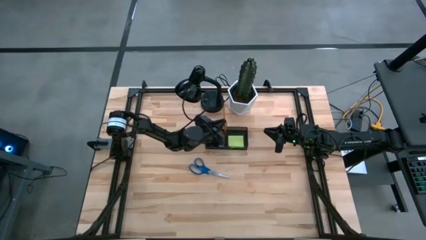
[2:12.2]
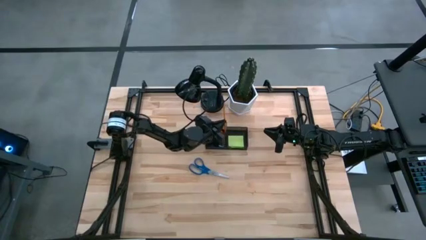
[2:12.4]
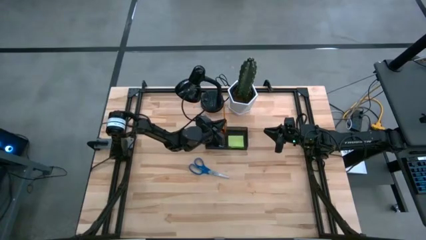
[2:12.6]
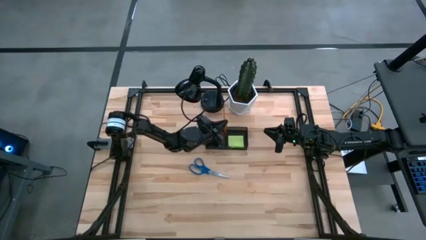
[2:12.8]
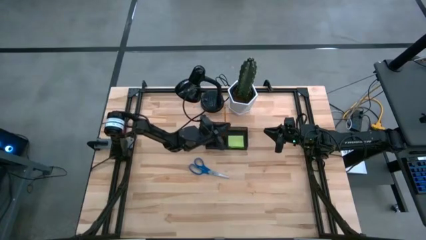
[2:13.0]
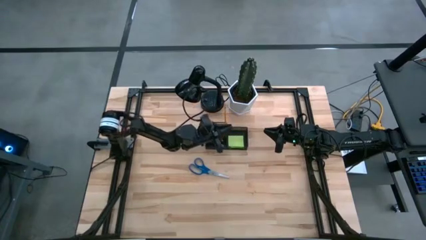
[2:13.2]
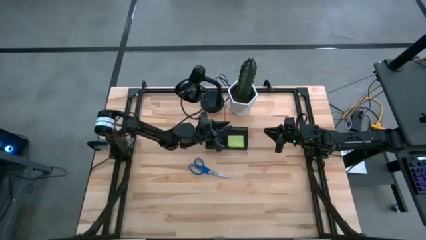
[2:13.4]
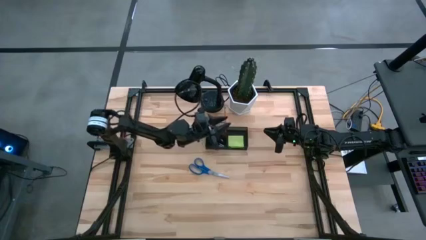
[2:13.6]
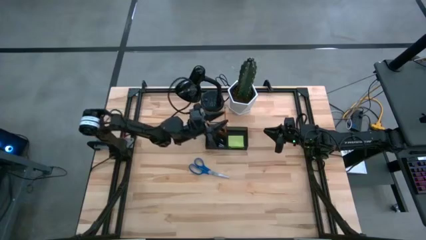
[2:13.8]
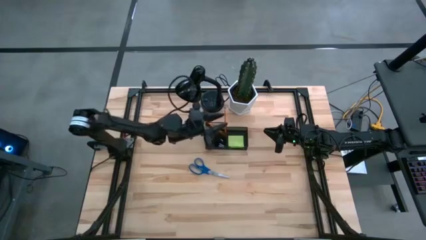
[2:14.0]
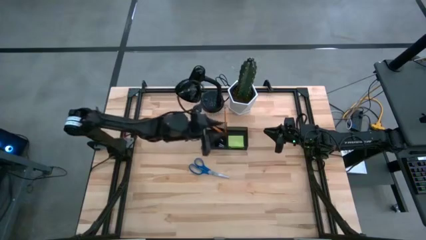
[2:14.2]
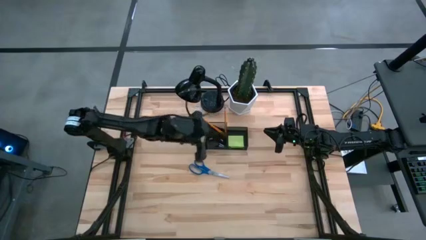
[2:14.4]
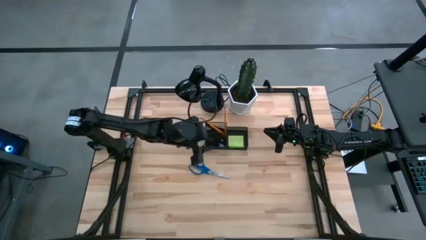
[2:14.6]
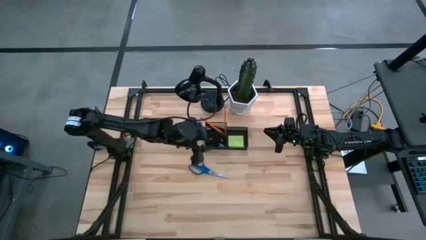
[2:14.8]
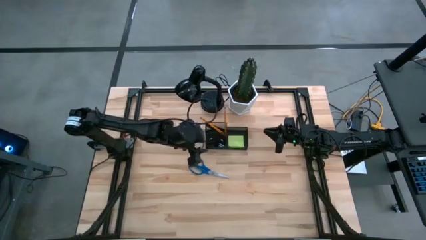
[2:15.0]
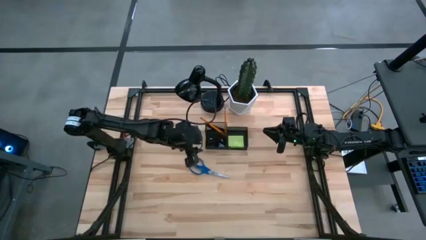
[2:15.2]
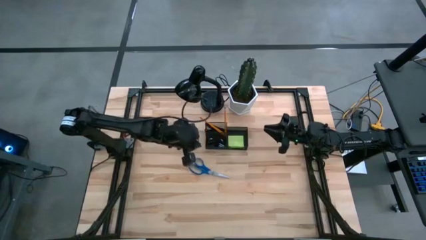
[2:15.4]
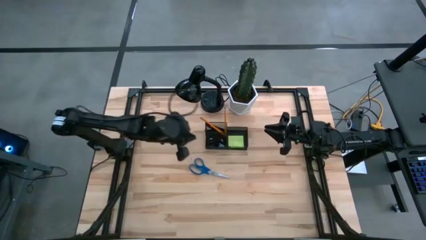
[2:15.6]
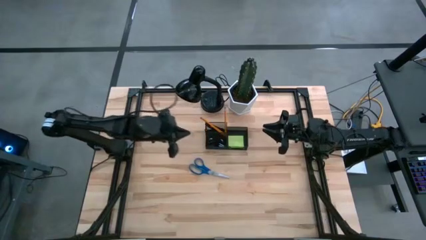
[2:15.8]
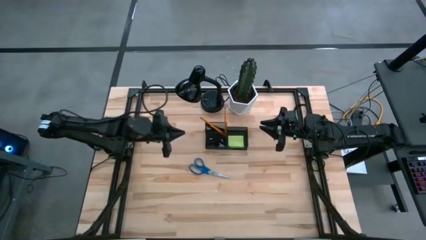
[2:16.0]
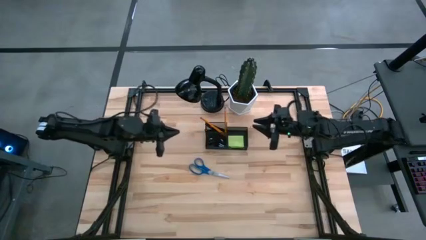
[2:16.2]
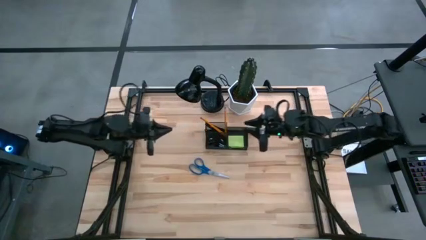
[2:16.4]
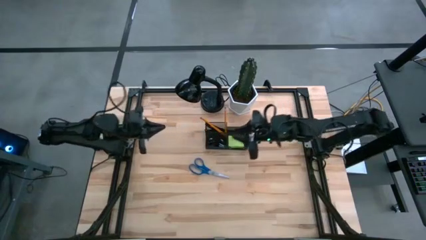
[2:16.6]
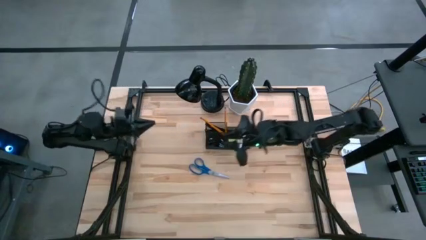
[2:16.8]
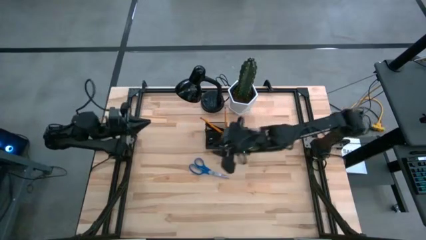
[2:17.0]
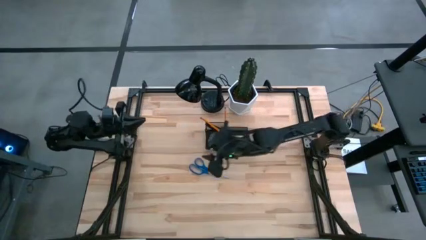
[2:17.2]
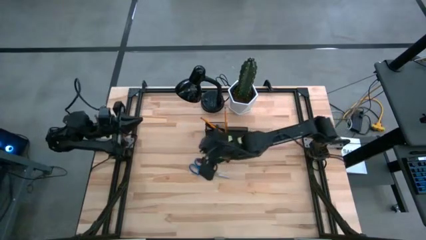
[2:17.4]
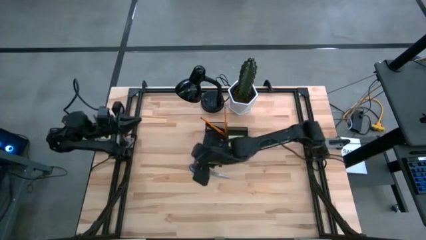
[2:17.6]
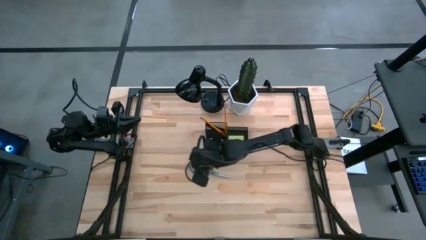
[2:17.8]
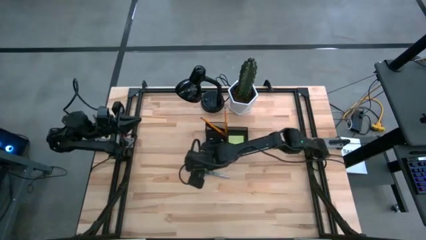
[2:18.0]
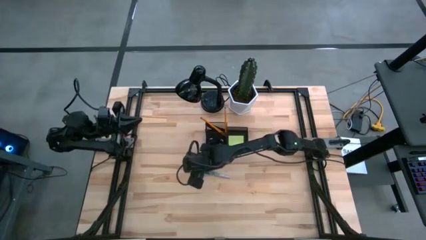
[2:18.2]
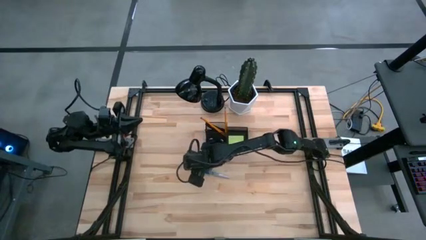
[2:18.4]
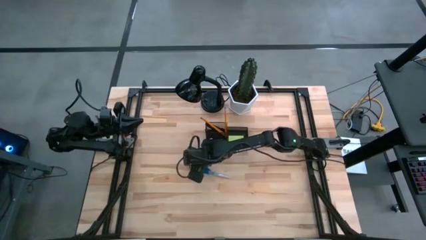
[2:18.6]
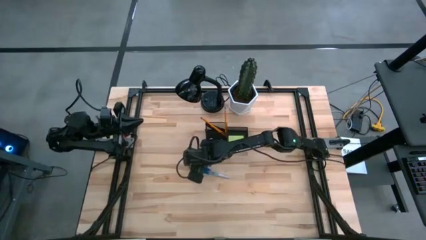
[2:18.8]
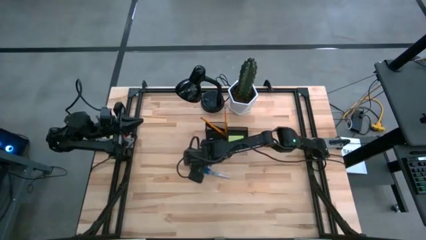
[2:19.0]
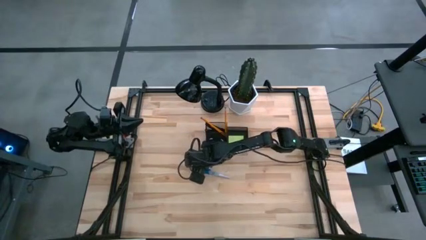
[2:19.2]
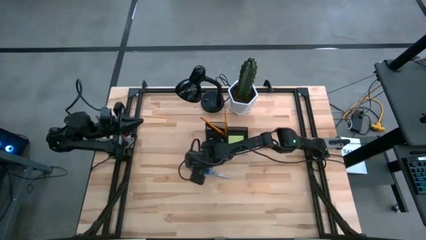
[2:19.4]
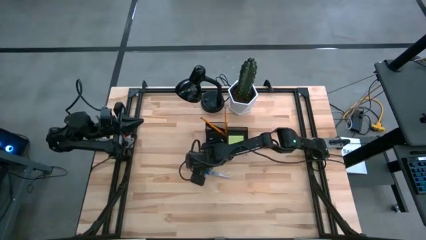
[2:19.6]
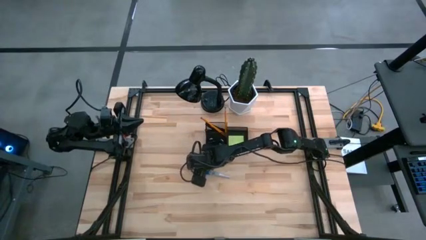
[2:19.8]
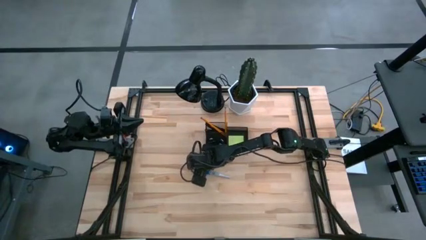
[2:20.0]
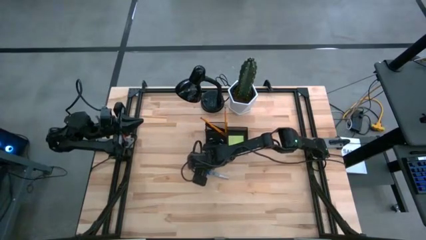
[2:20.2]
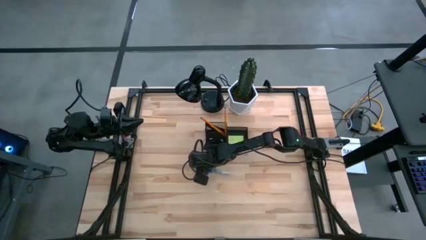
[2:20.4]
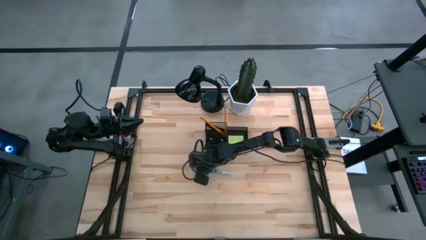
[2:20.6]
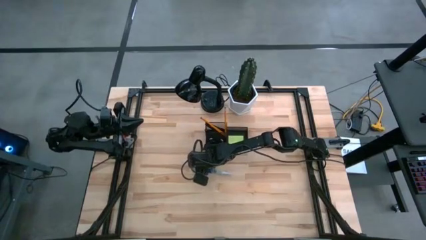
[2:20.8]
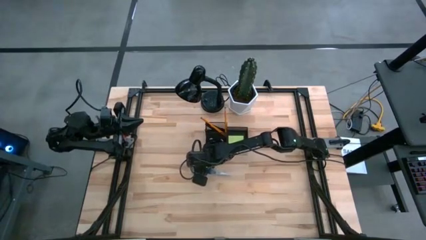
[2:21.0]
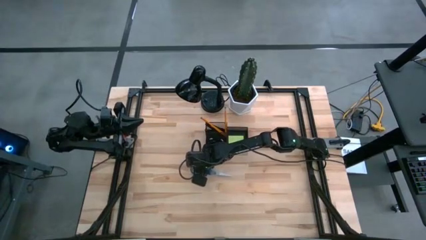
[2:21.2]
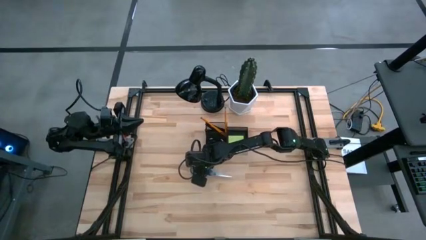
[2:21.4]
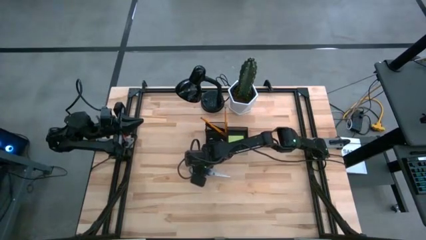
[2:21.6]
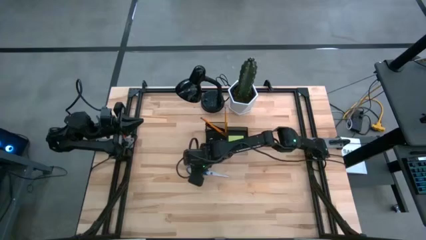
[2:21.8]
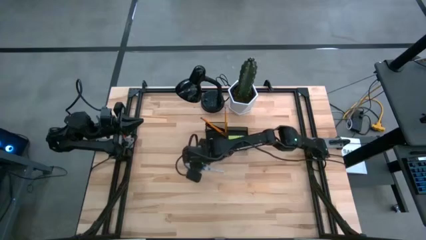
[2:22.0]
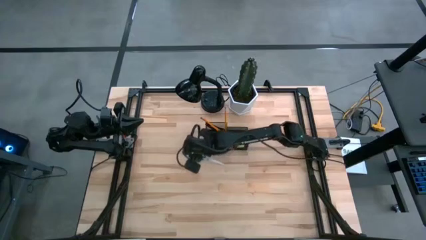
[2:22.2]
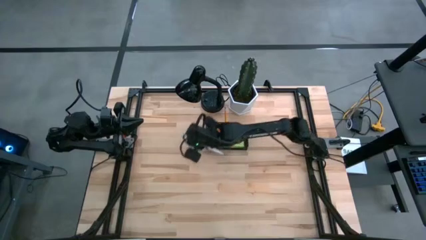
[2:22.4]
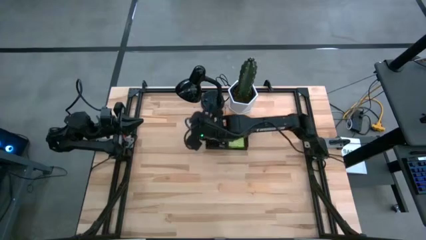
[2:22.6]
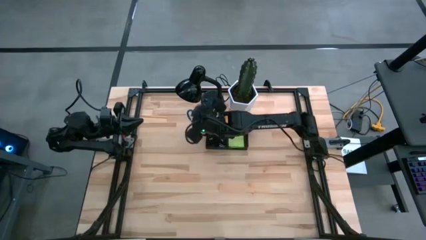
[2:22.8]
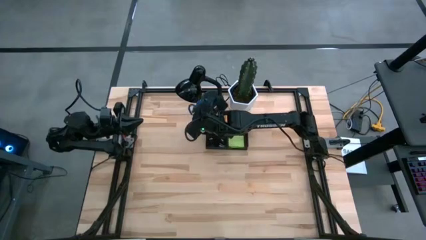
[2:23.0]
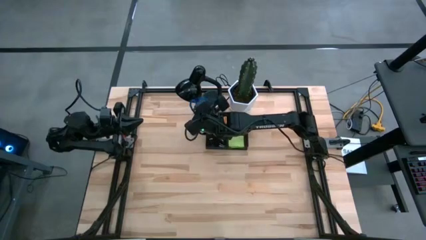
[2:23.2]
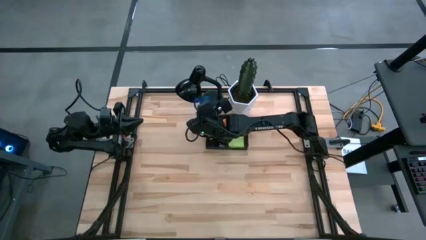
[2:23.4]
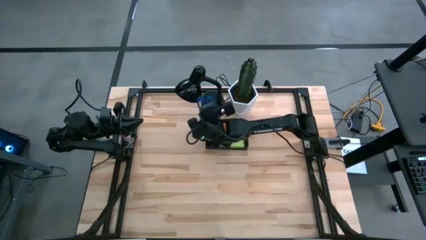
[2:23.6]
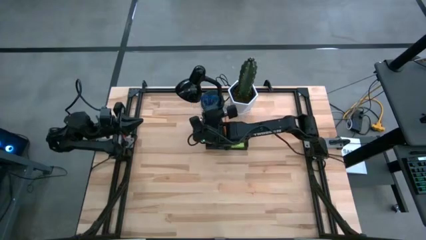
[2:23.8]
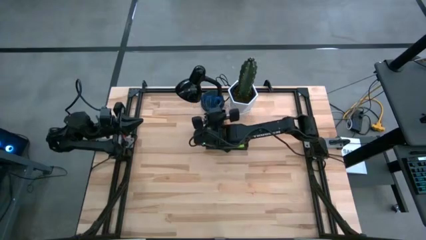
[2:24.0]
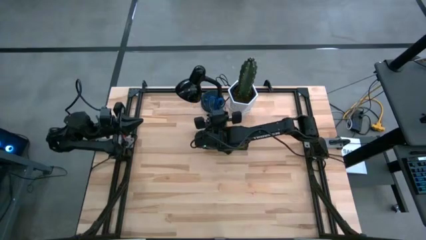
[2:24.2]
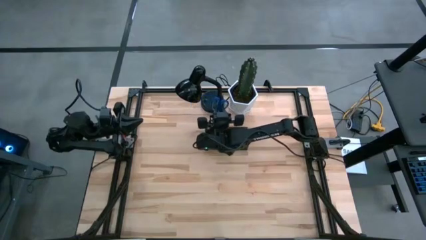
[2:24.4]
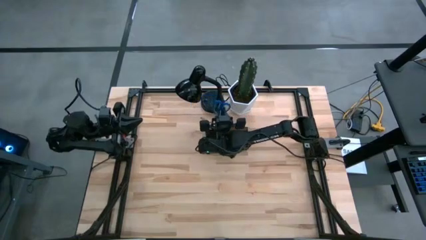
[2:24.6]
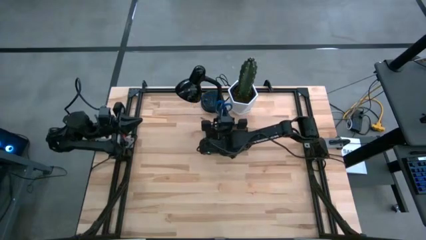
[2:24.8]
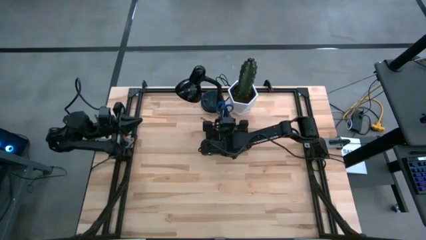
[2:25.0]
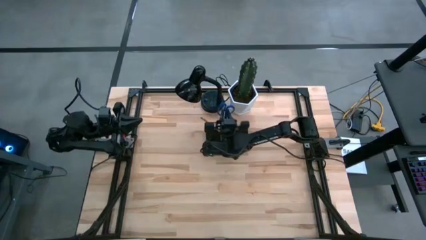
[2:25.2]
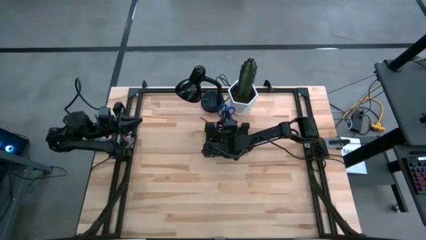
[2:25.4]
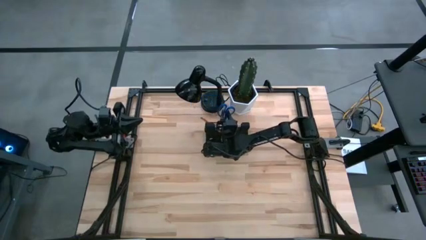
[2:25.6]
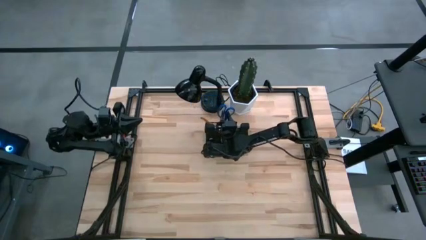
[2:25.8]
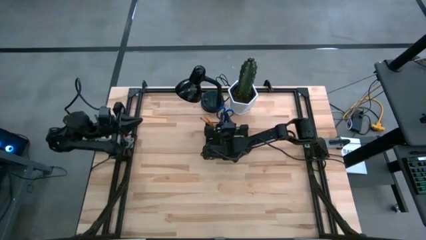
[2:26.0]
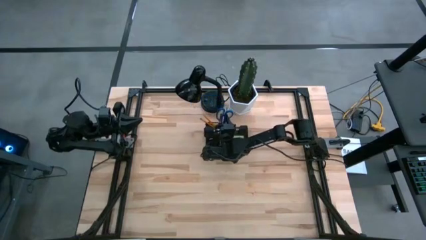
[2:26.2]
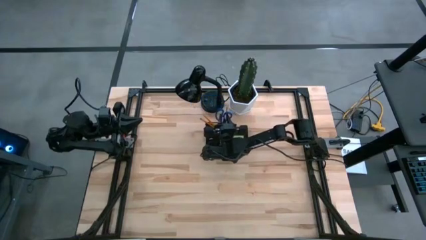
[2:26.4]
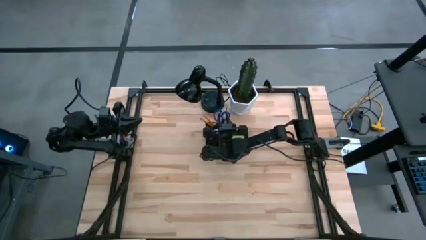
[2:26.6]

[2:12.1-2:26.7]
Task: Pick and place office supplies into organizer
Put the scissor into the mesh desk organizer
